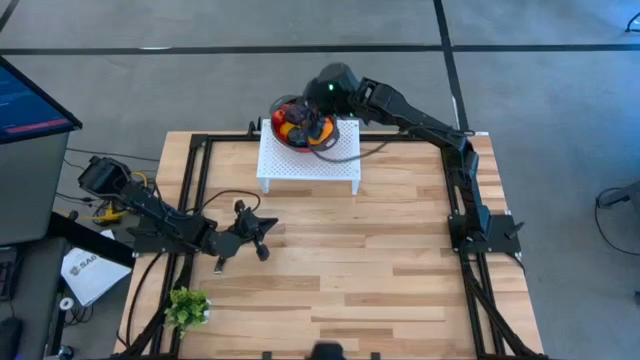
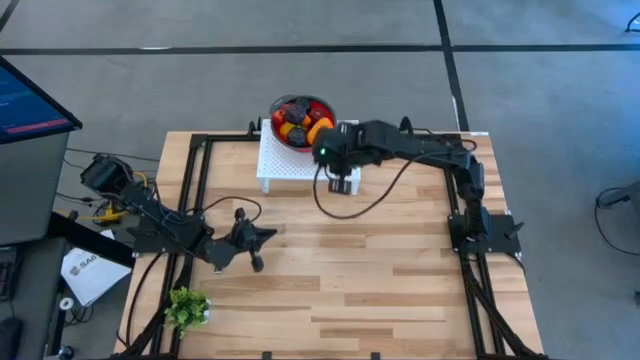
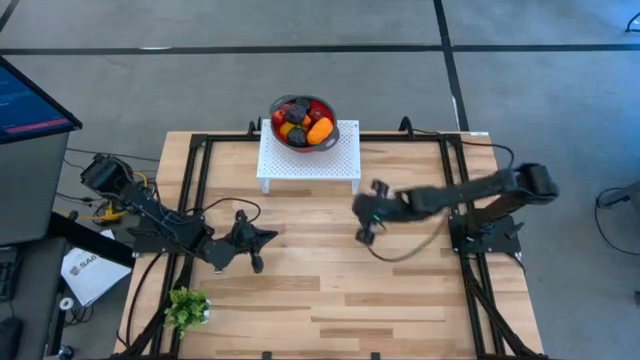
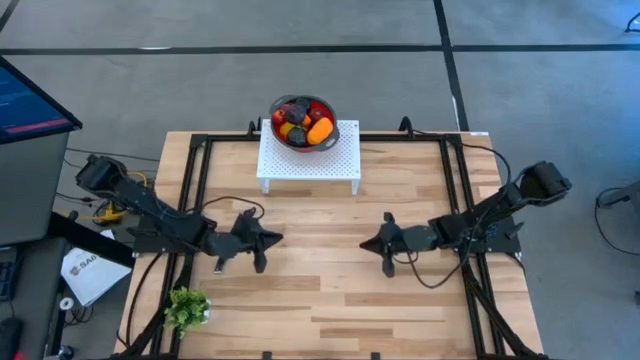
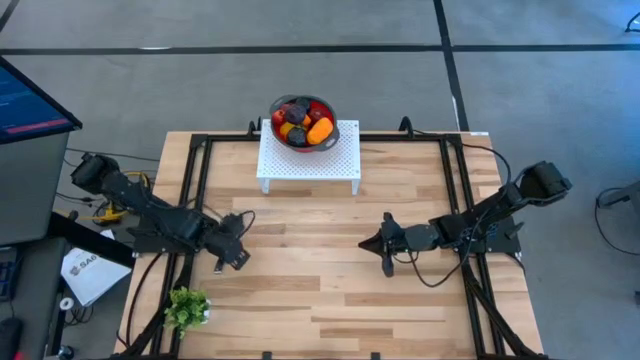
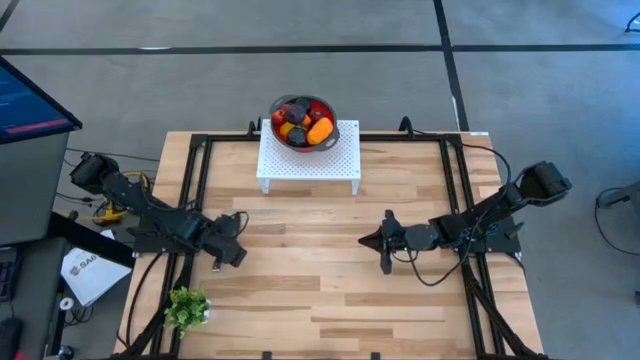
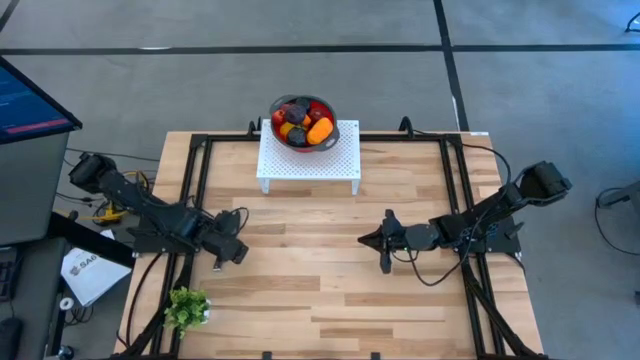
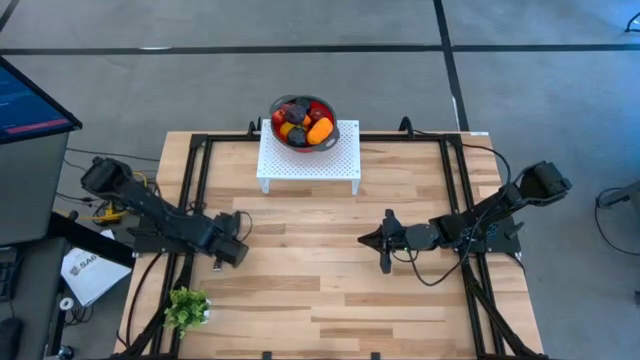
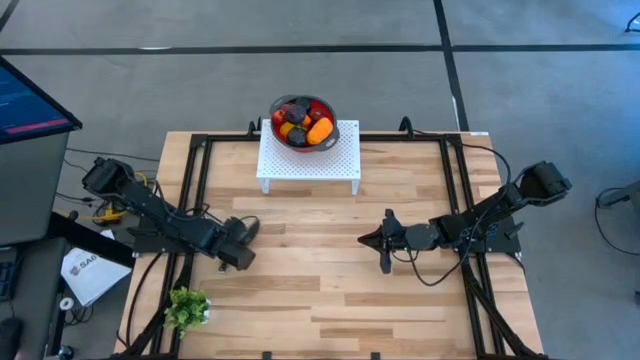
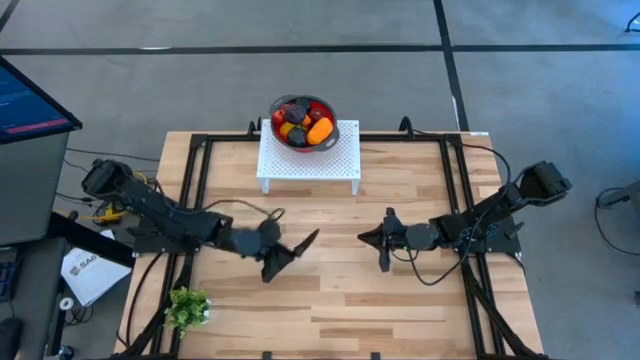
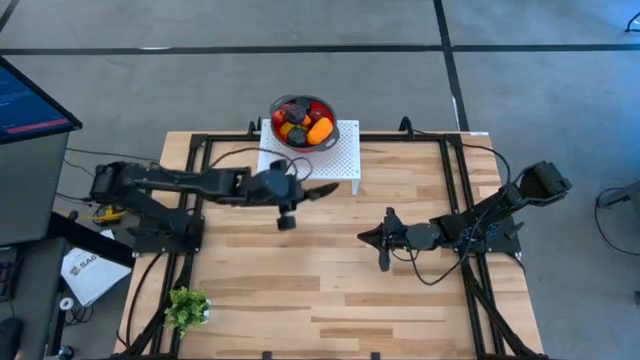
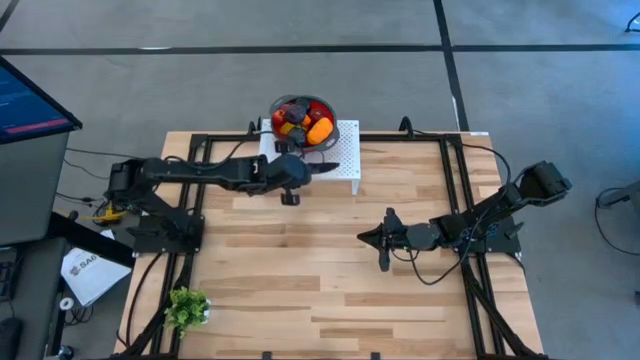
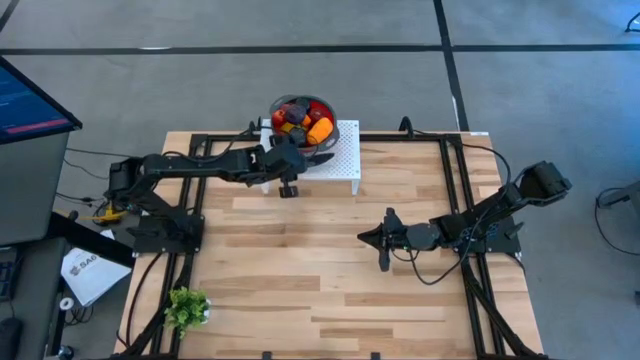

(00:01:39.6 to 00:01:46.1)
Task: Pick & Place Fruit
Put the black knife on the shelf

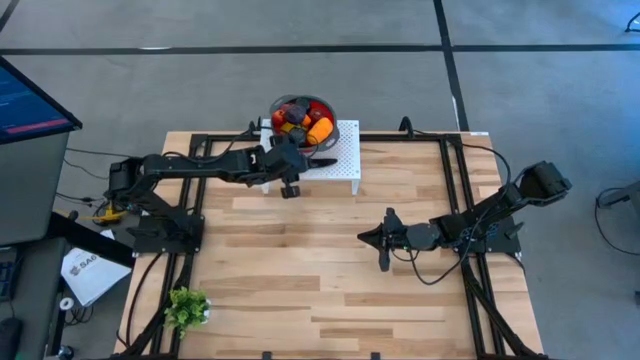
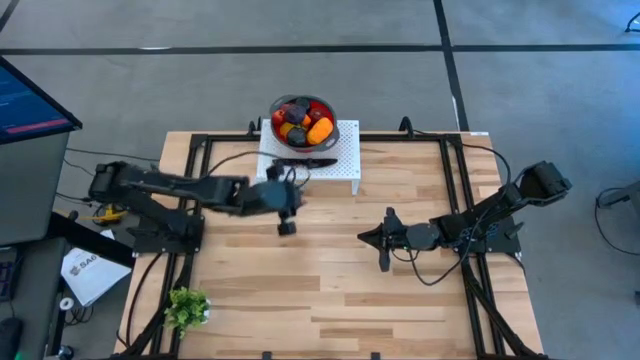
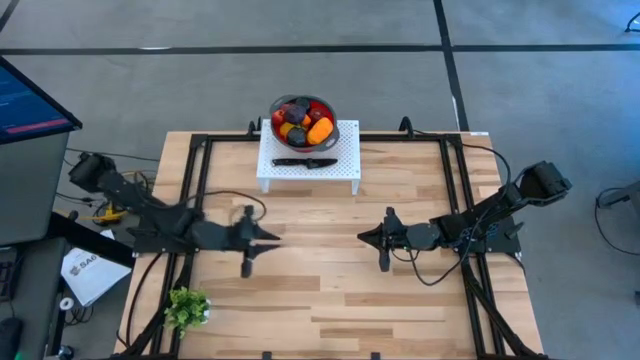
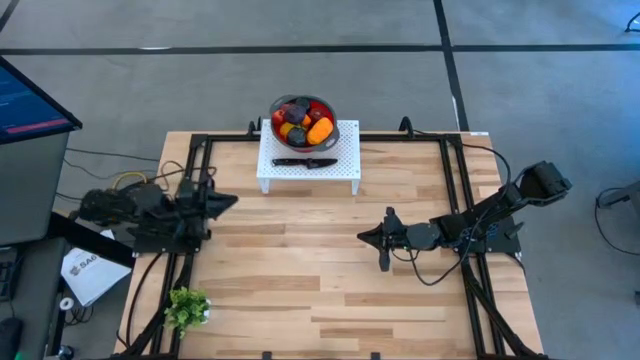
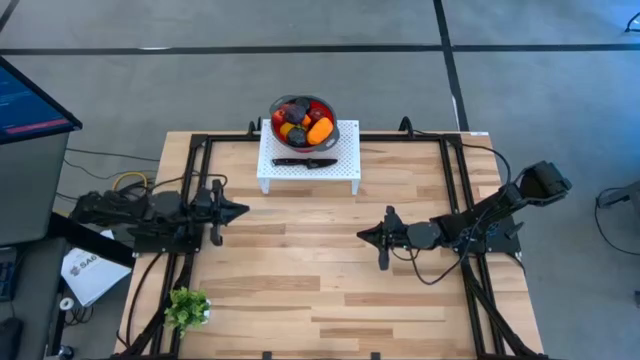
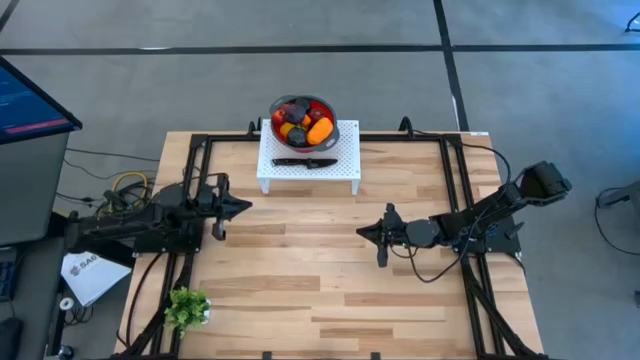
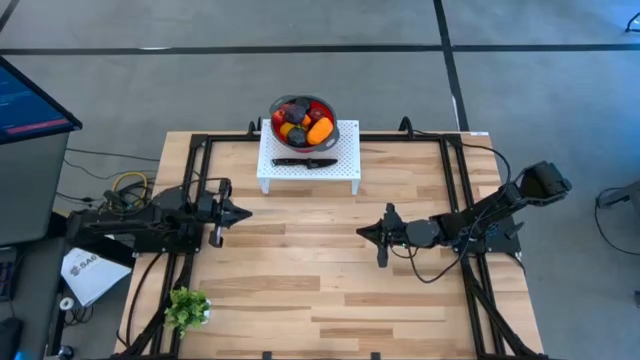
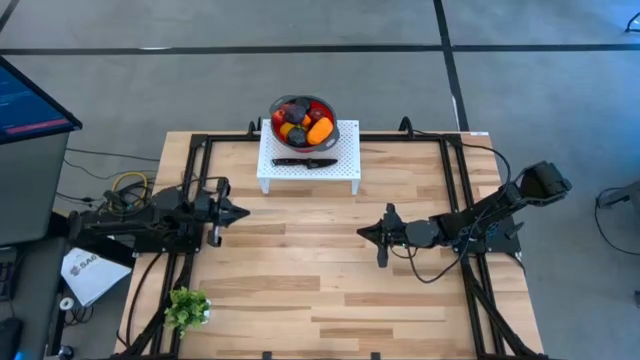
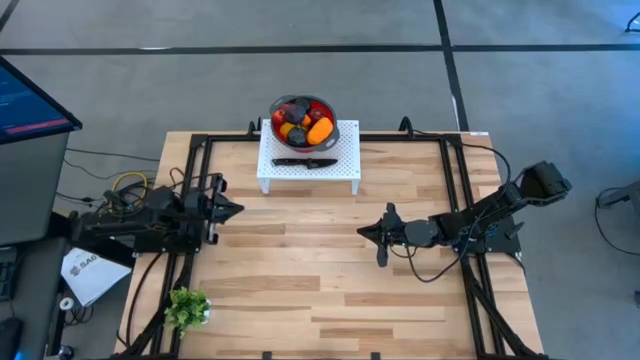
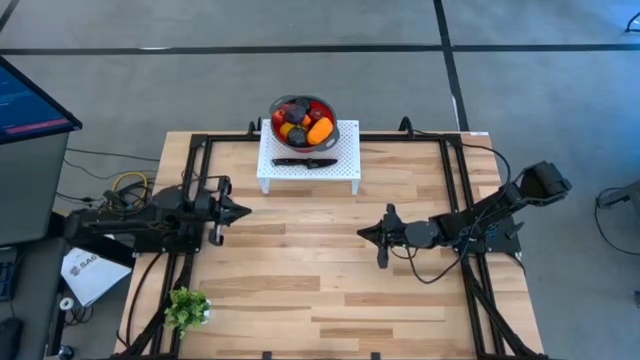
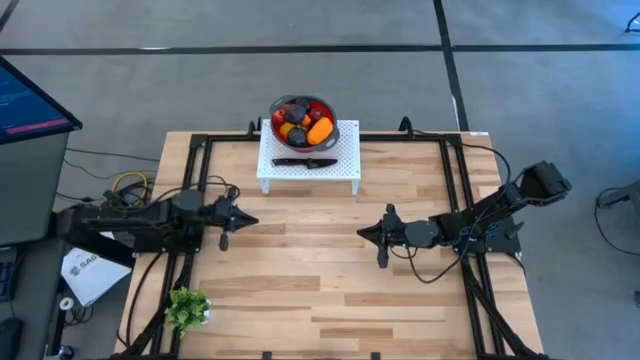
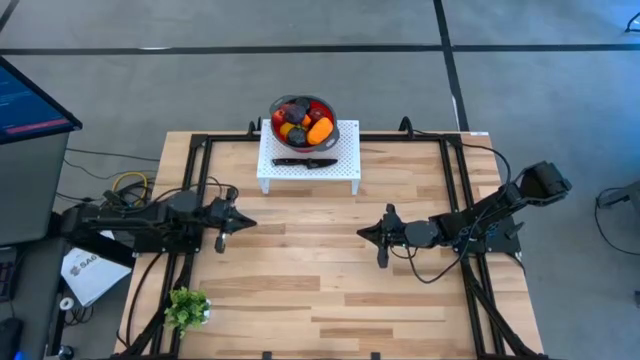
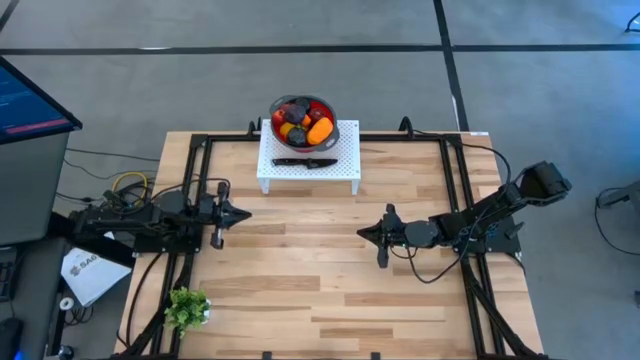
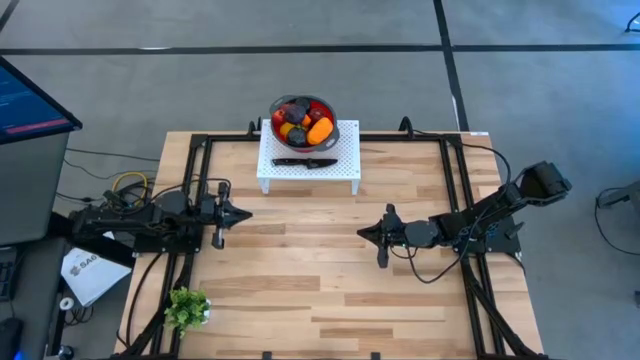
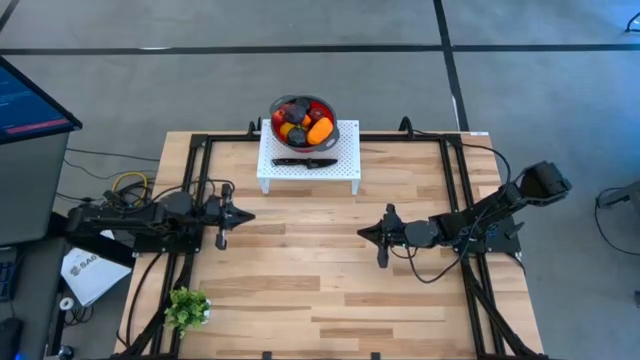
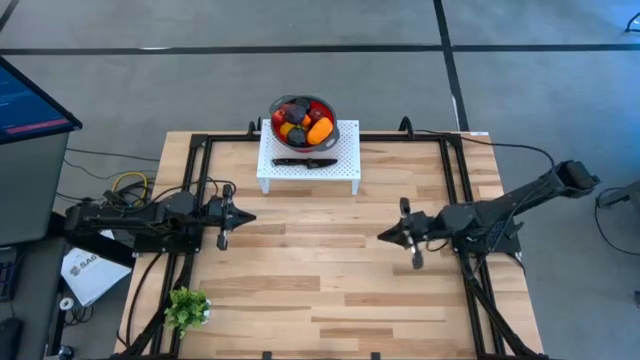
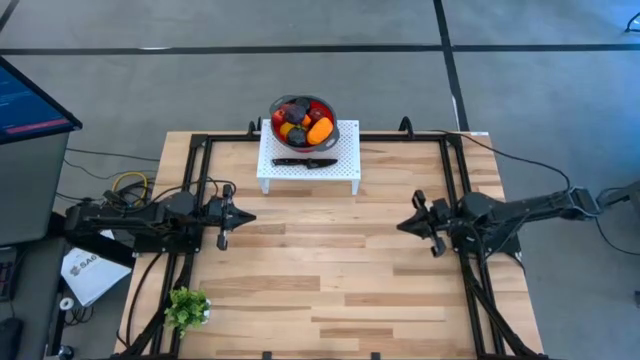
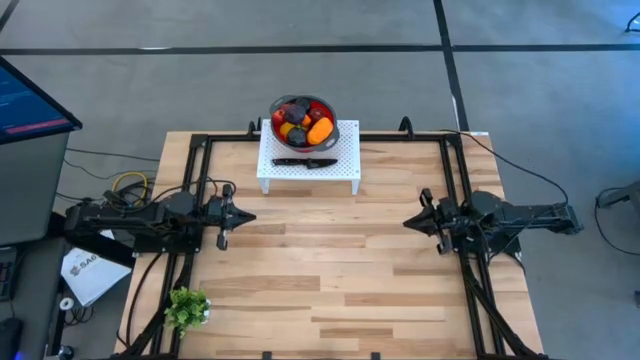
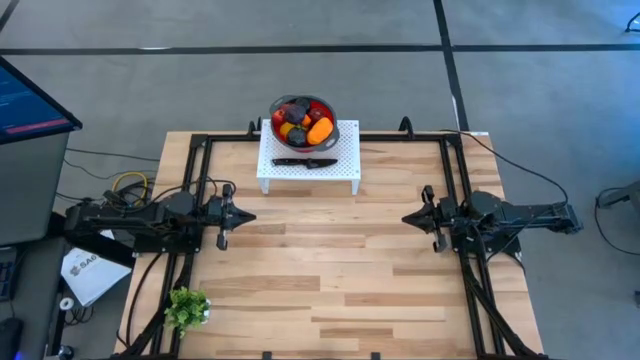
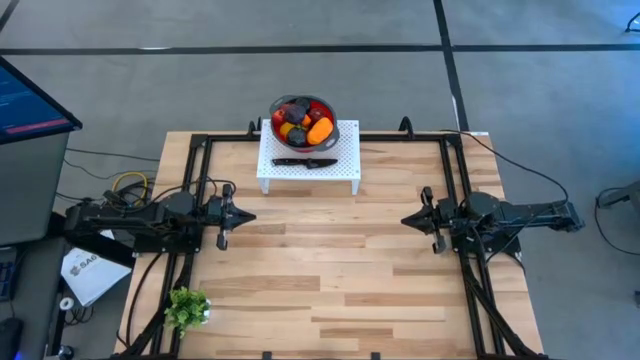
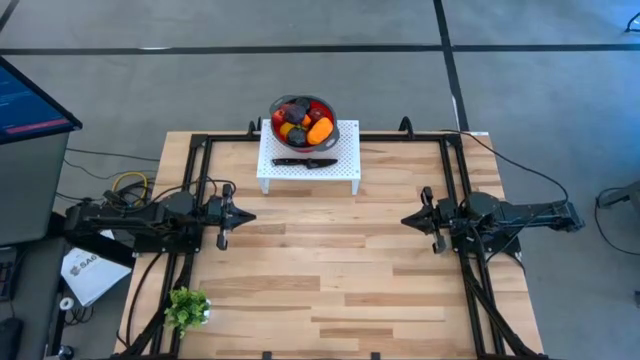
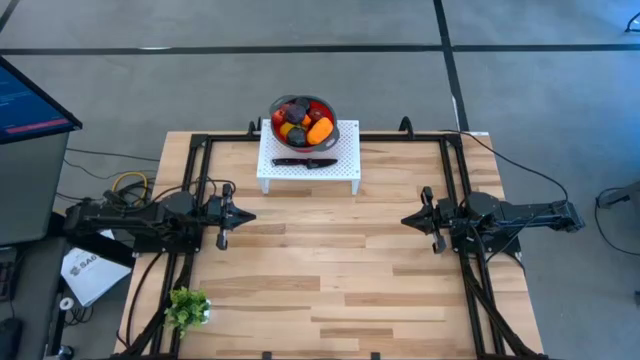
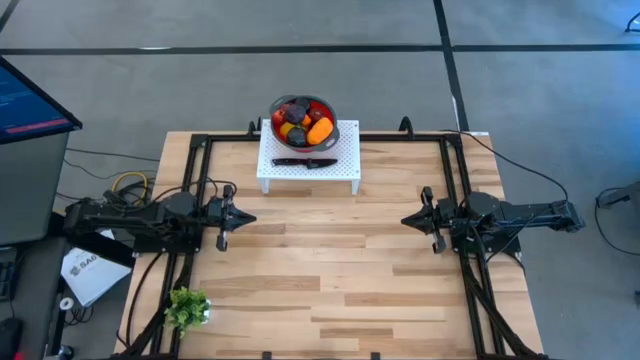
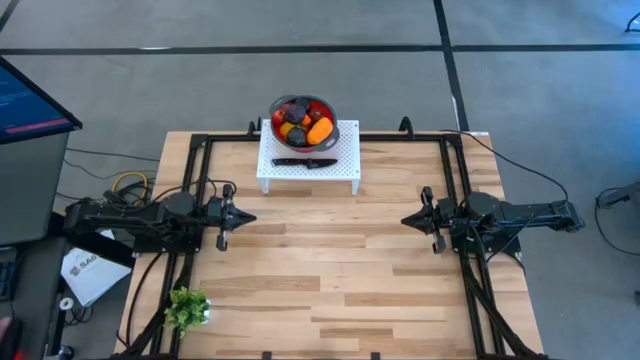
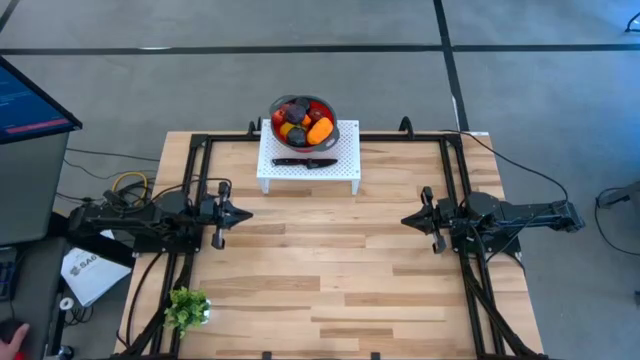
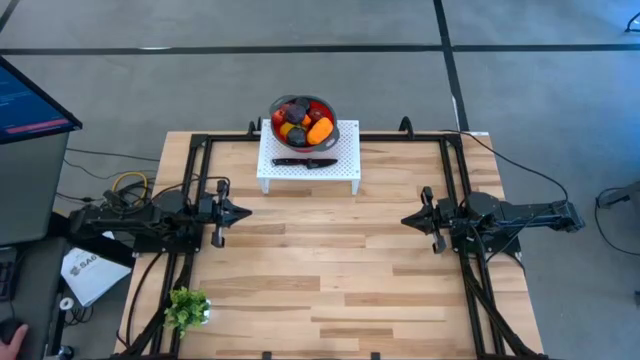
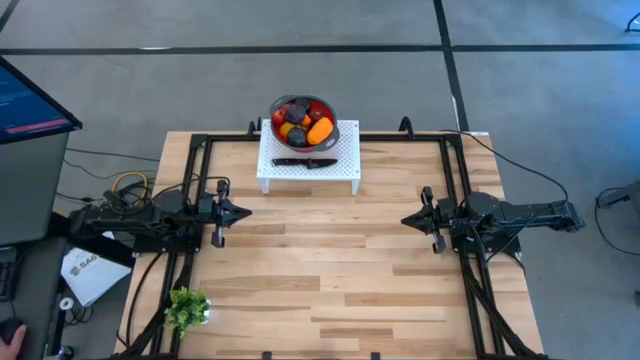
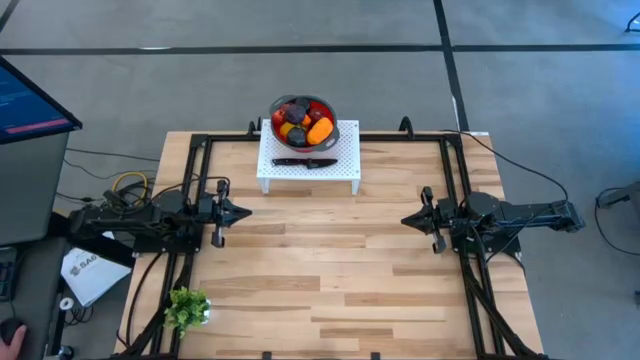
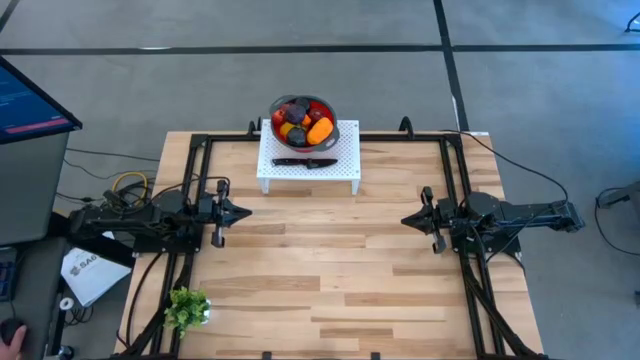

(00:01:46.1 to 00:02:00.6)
Return to Home Position
